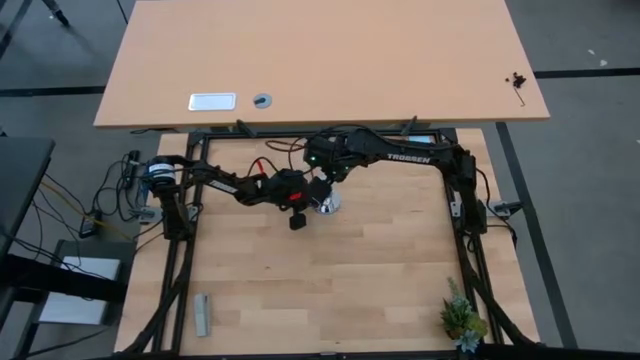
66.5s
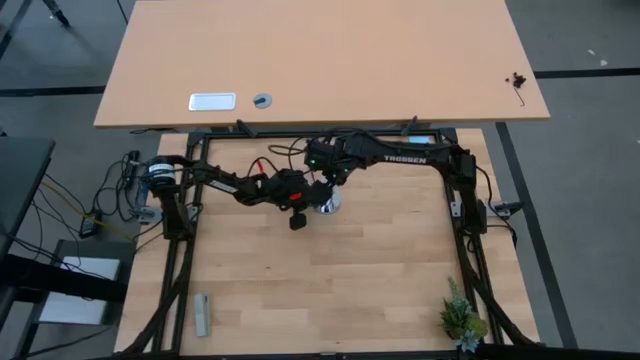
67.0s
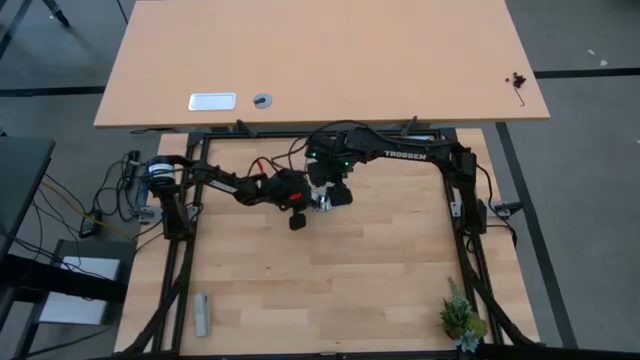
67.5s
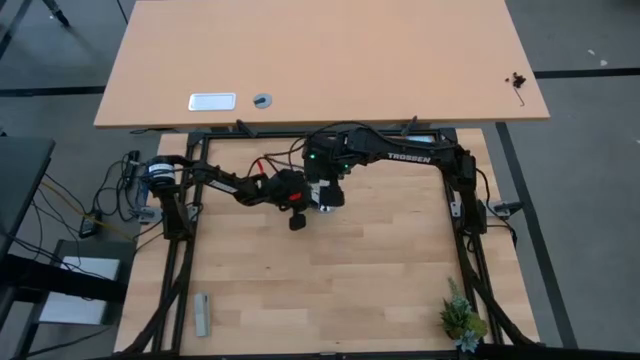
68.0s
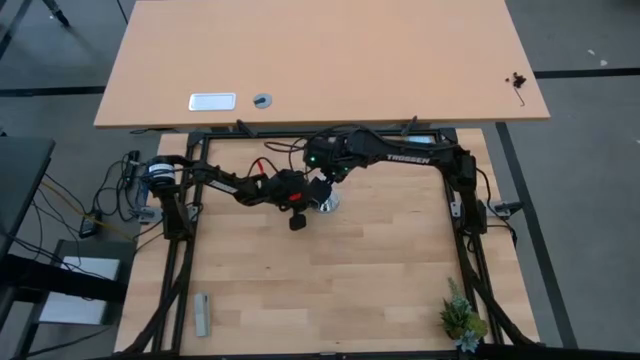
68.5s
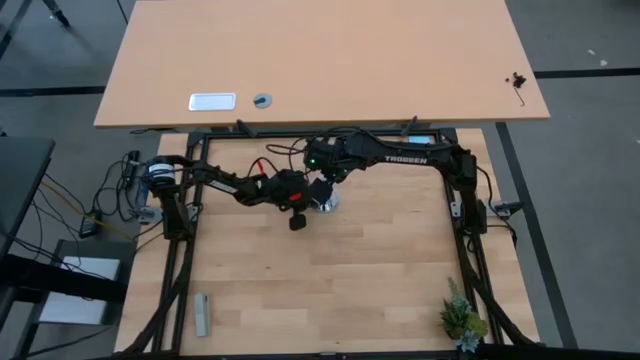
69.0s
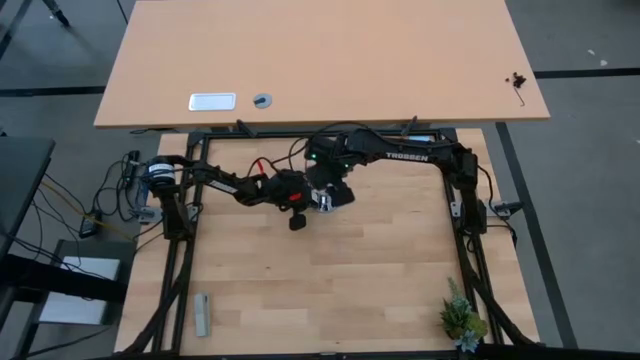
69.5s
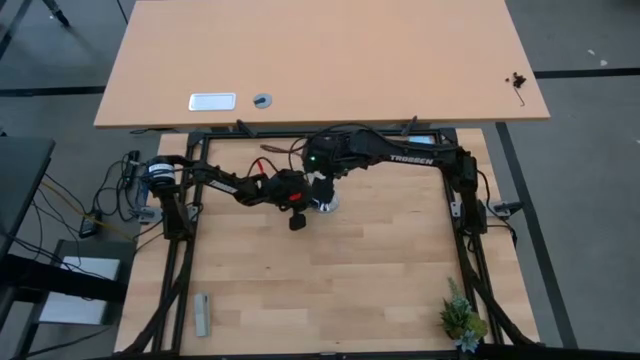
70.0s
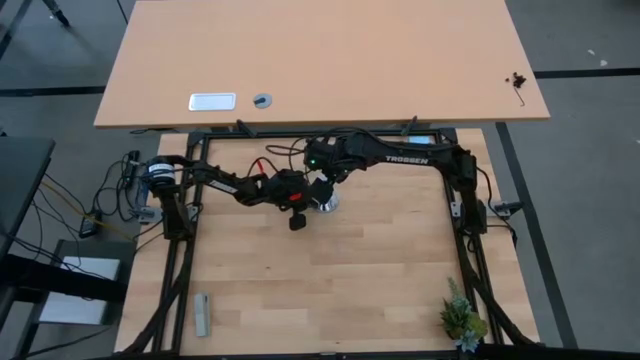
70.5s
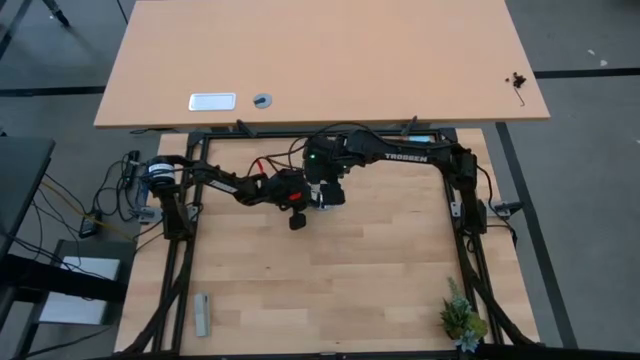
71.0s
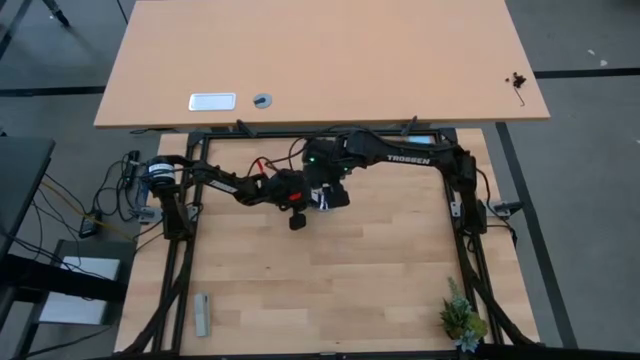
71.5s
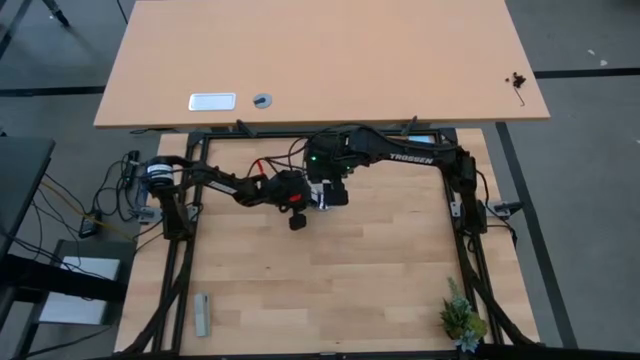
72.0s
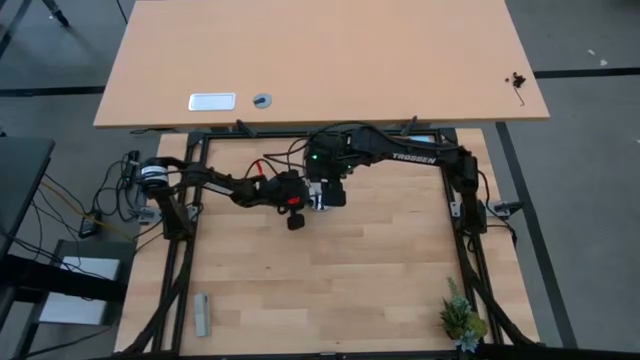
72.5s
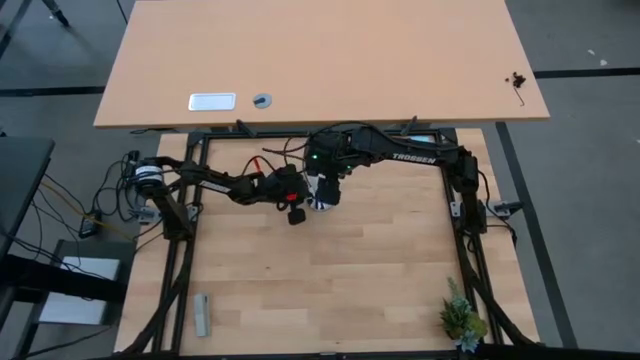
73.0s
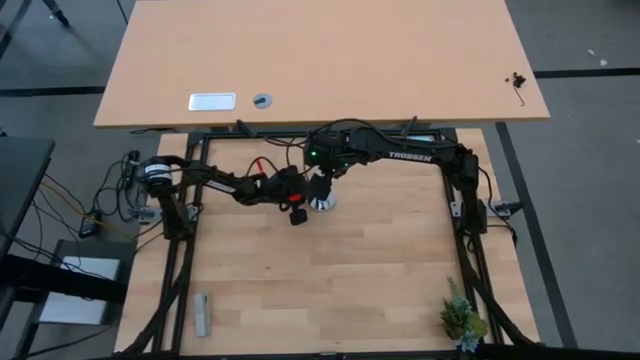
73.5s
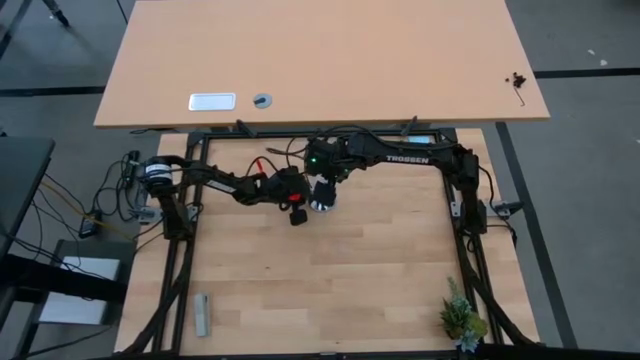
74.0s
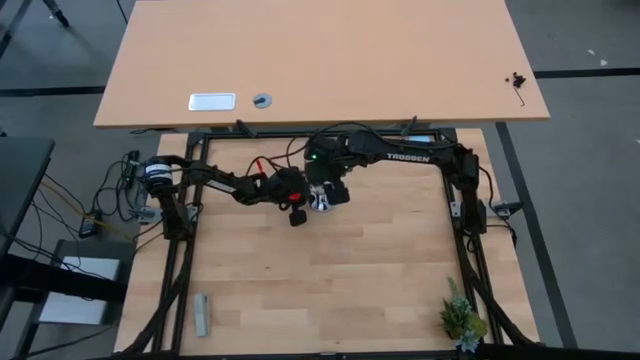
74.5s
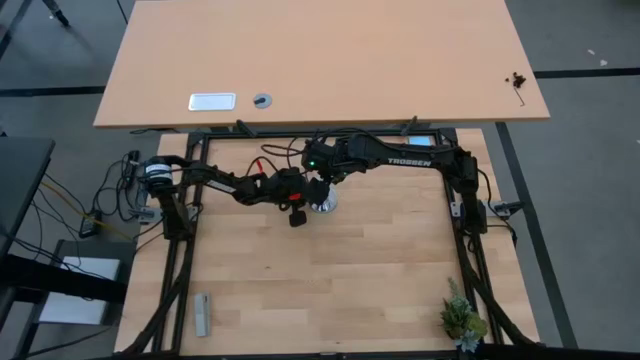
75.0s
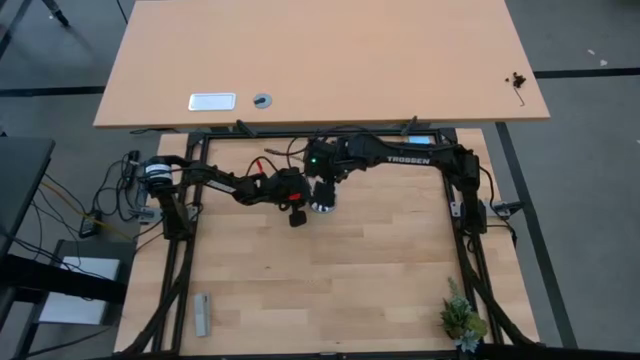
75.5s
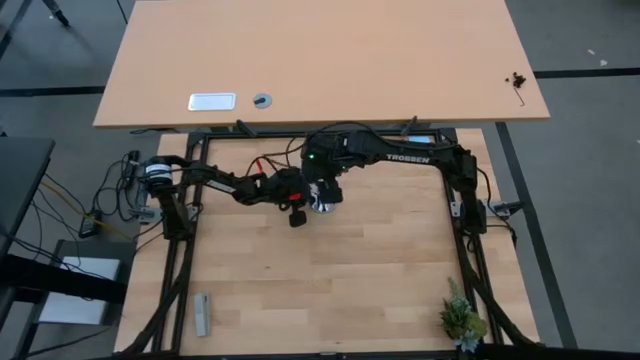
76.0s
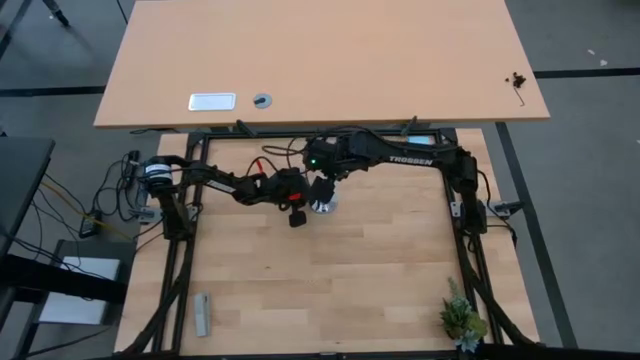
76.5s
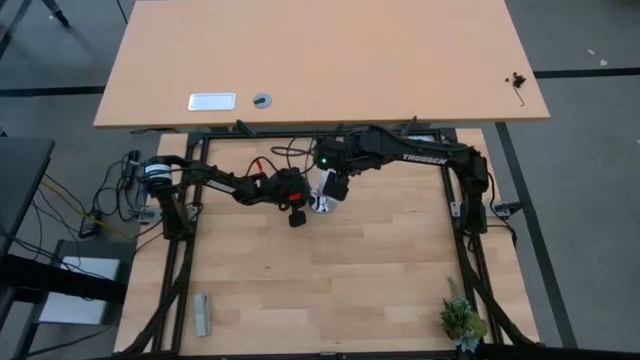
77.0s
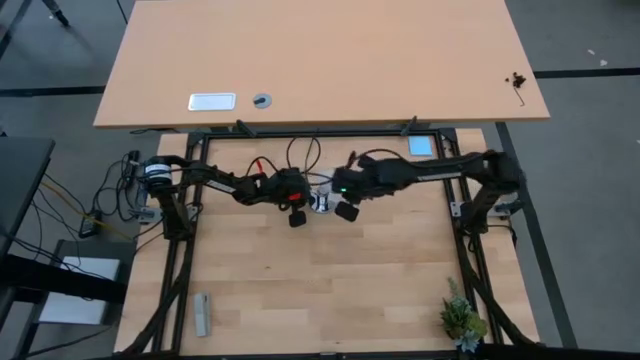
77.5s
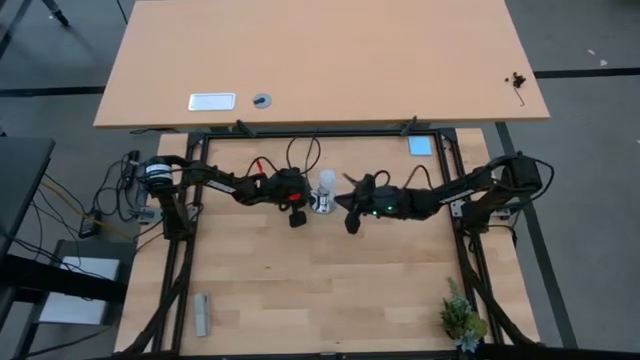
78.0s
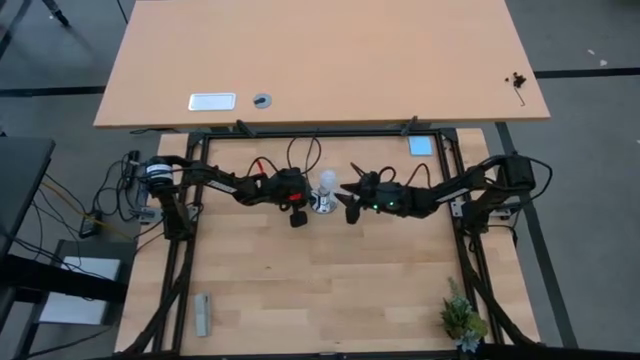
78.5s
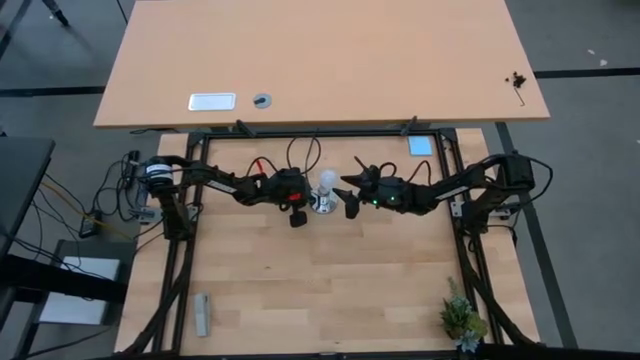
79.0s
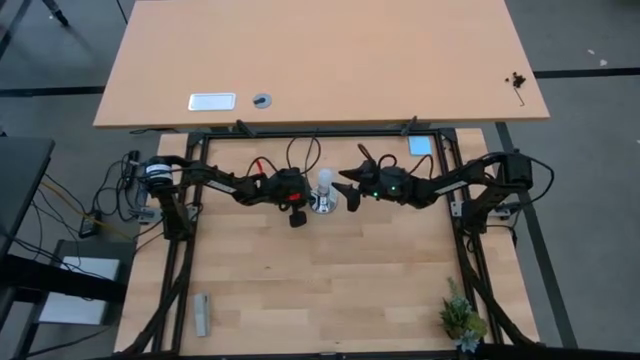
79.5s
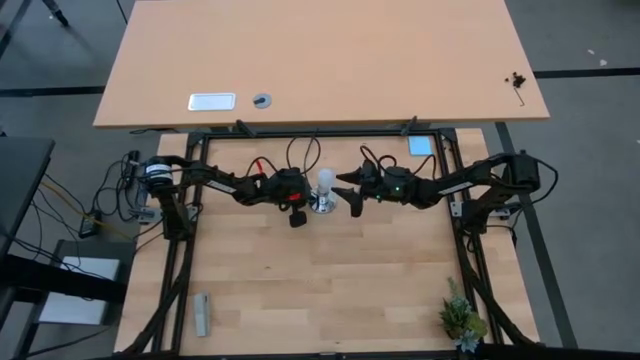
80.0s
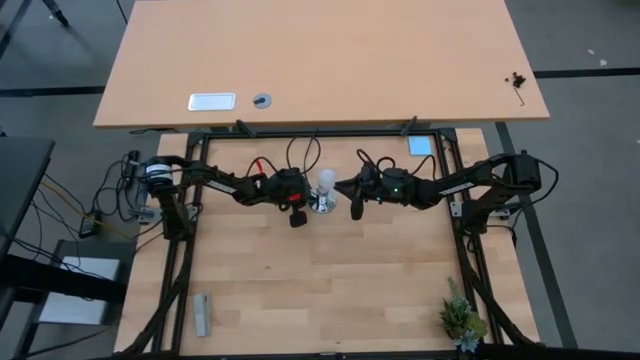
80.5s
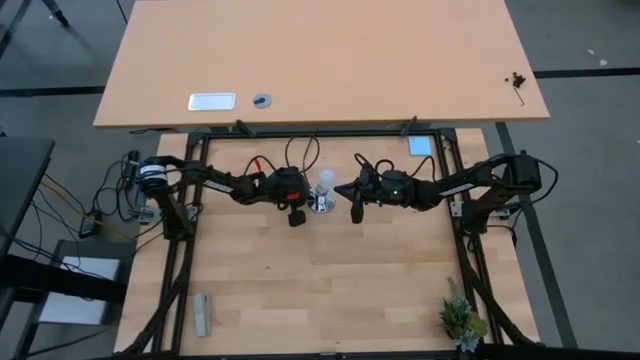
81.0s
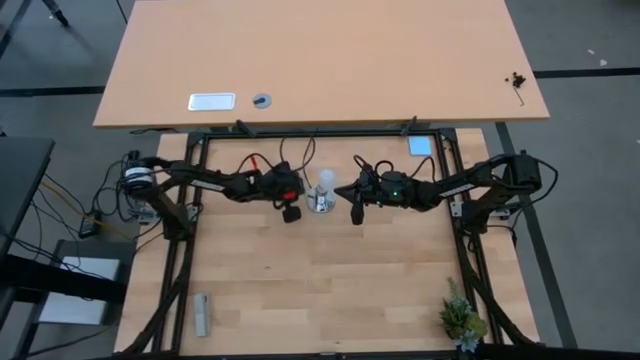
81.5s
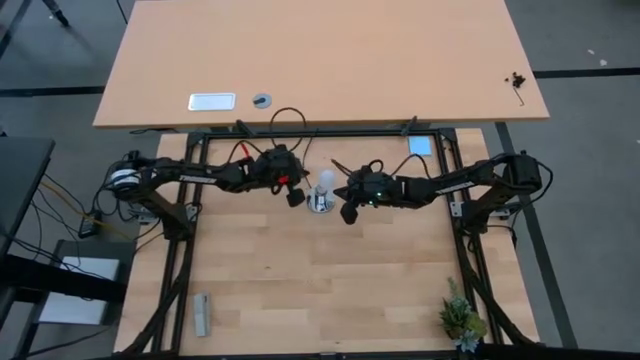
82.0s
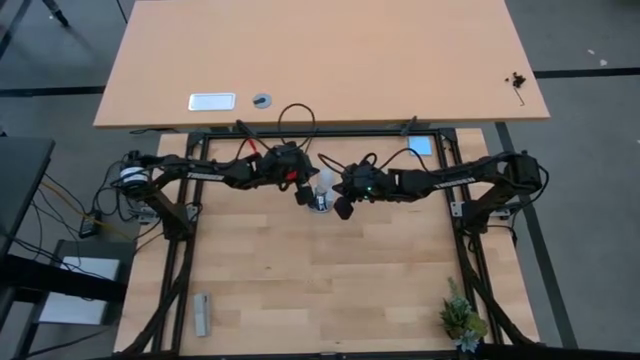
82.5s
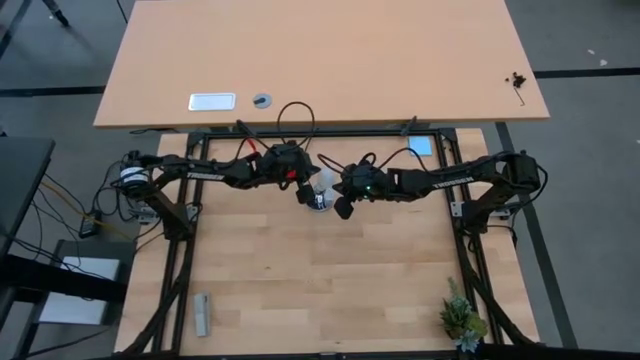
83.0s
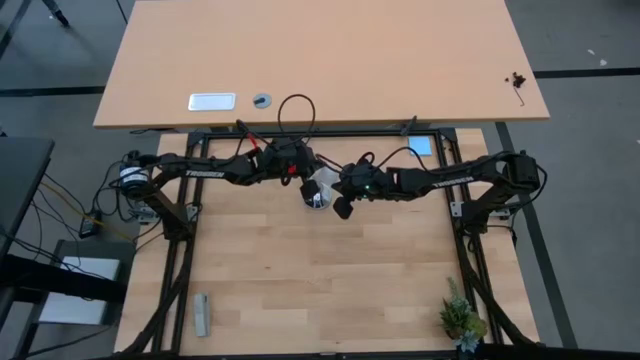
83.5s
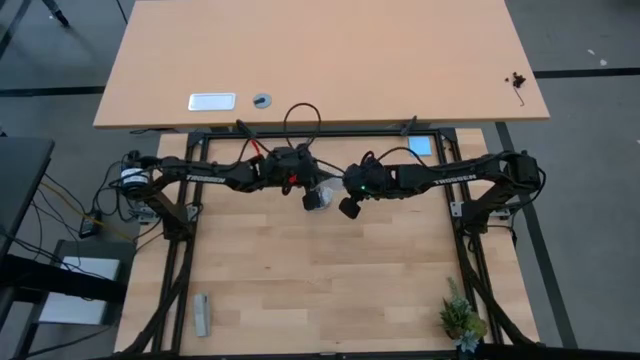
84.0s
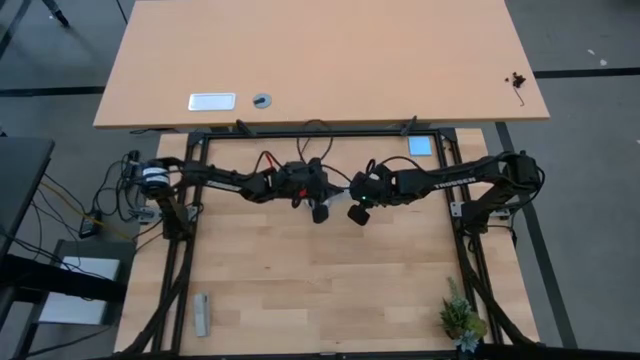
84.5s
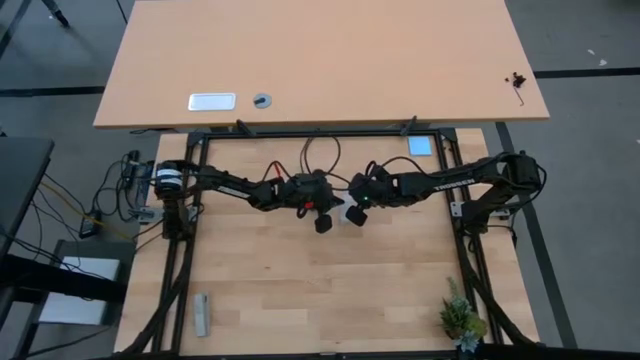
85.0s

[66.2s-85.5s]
Task: Screw lightbulb
Remove the lightbulb from the lamp socket

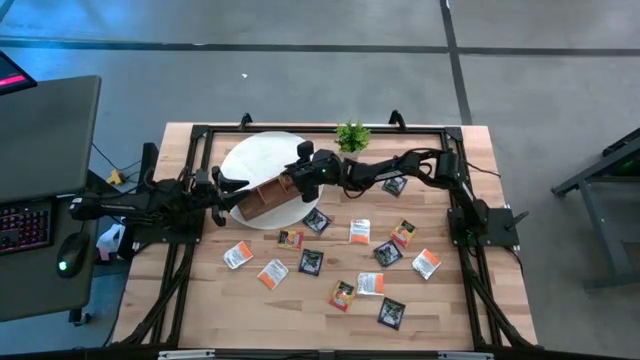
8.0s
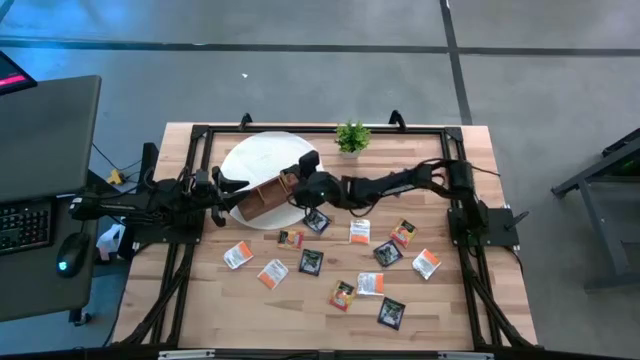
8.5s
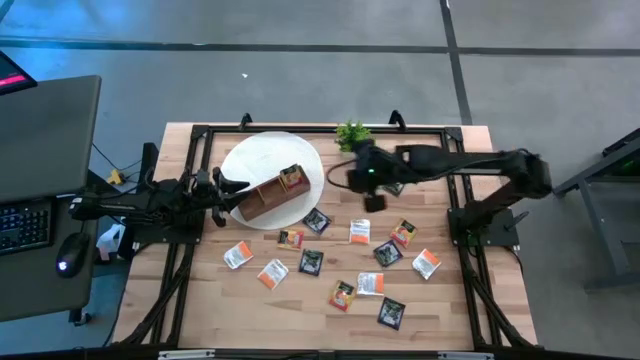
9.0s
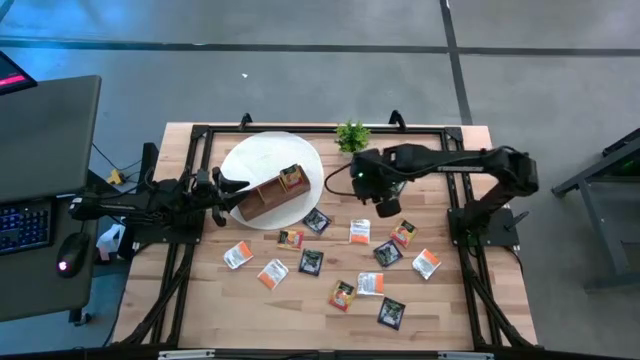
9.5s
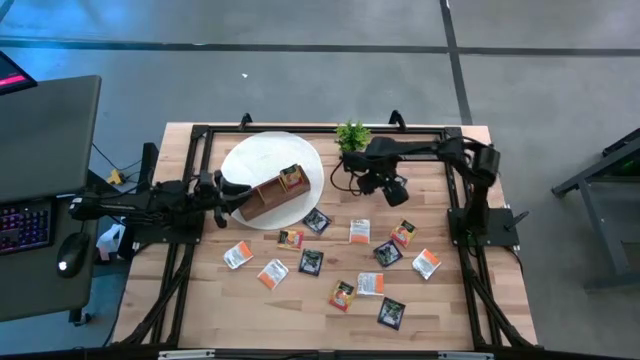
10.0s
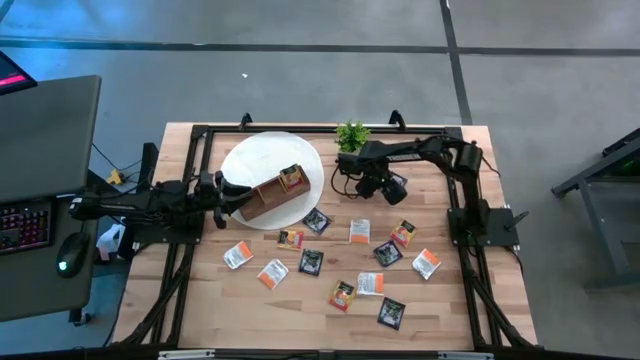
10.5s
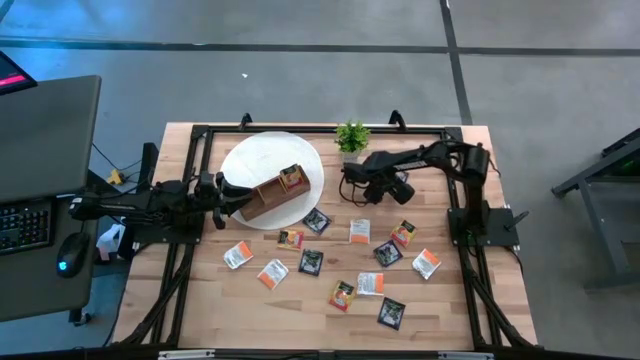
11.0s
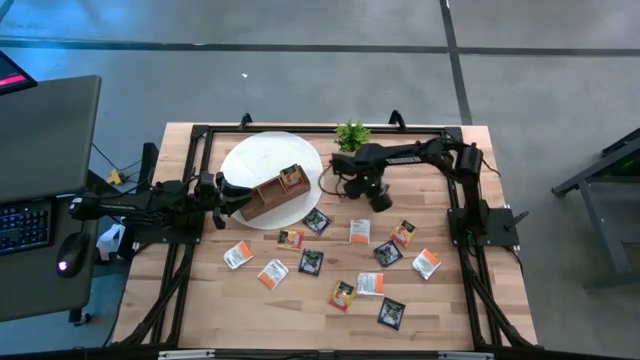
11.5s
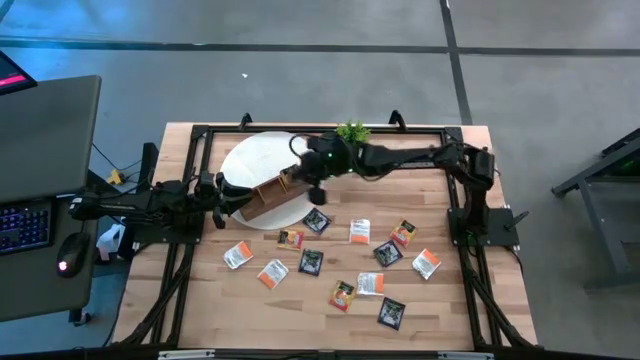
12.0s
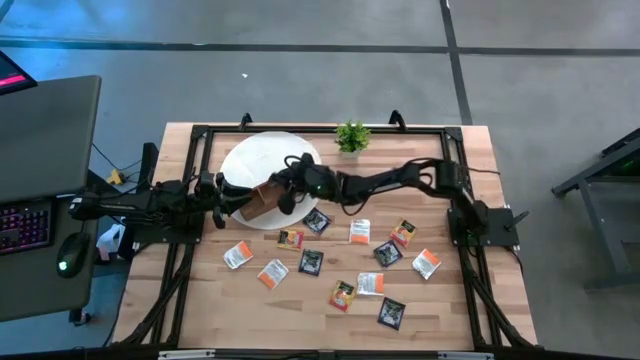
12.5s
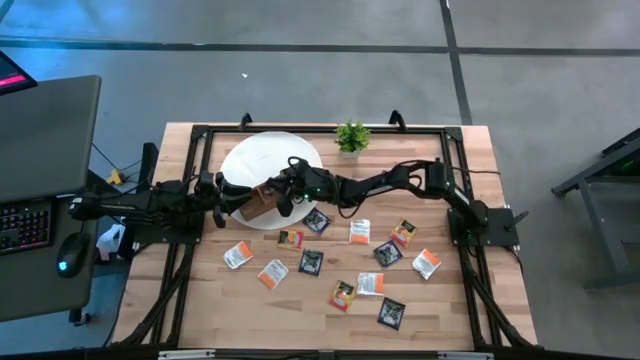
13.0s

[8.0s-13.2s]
Task: Pick & Place Tea
Put the purple tea bag into the left section of the wooden organizer
